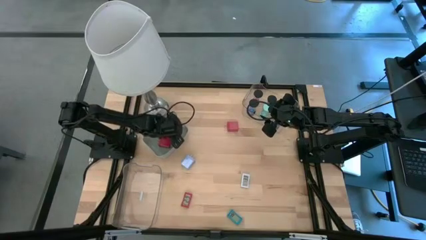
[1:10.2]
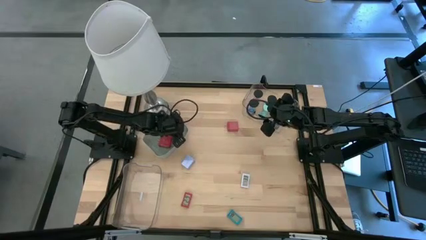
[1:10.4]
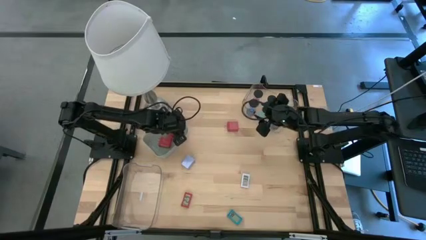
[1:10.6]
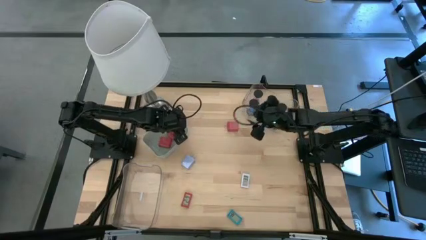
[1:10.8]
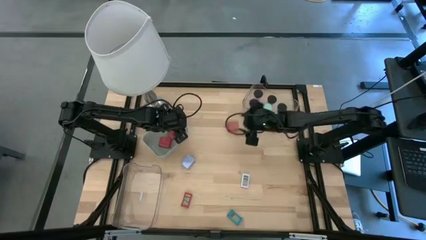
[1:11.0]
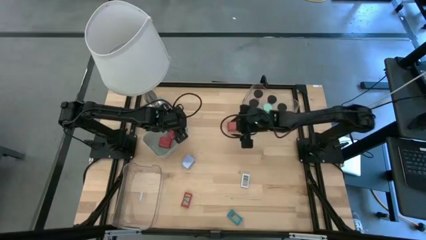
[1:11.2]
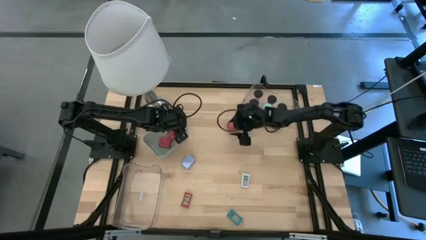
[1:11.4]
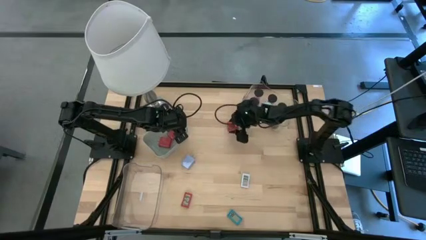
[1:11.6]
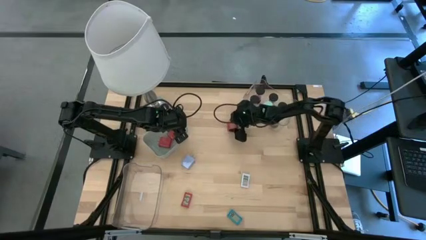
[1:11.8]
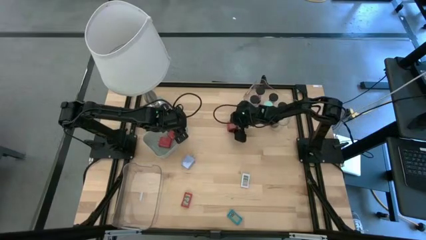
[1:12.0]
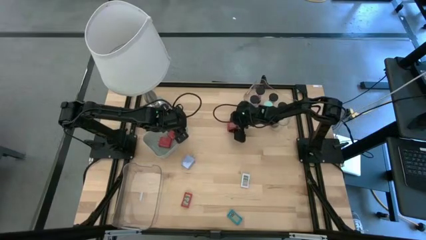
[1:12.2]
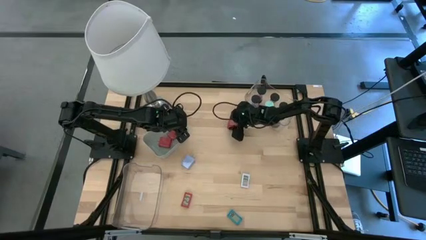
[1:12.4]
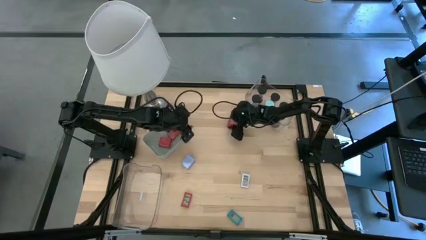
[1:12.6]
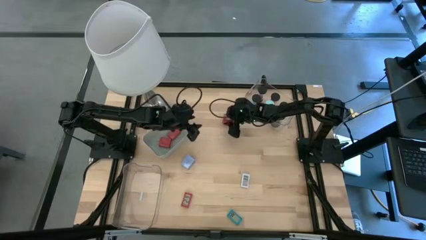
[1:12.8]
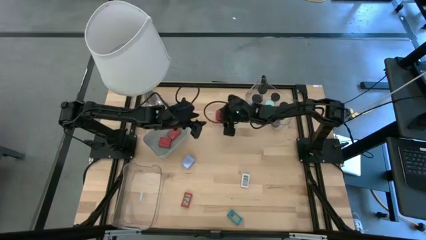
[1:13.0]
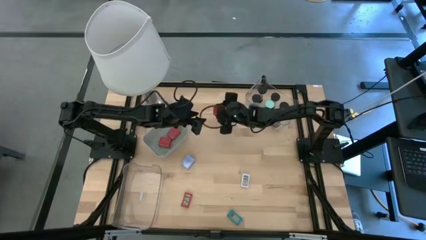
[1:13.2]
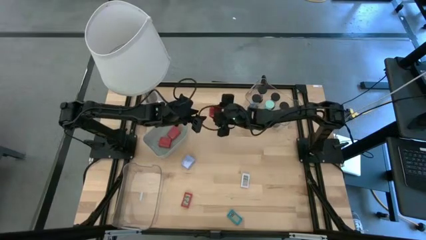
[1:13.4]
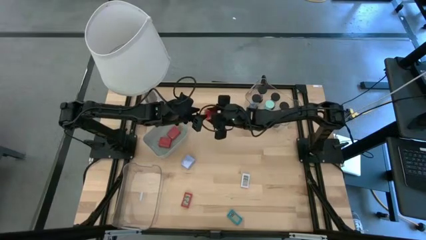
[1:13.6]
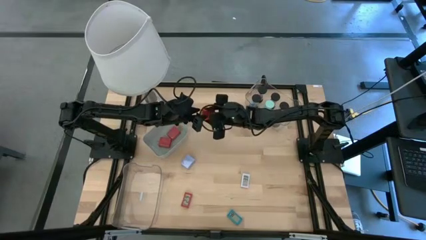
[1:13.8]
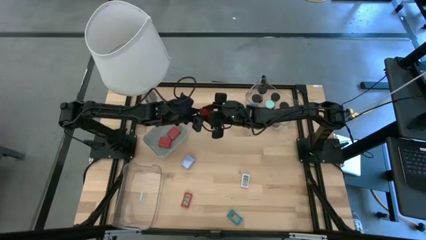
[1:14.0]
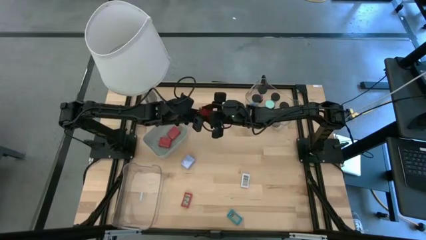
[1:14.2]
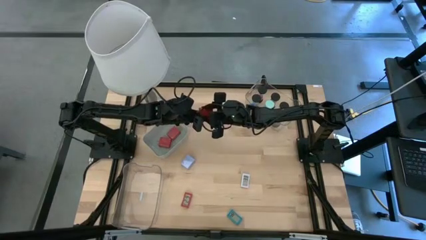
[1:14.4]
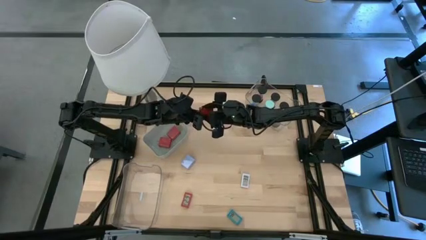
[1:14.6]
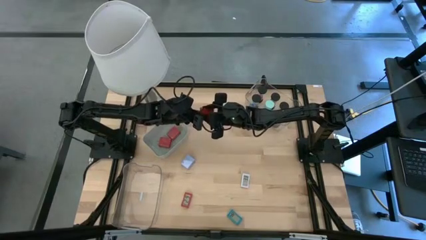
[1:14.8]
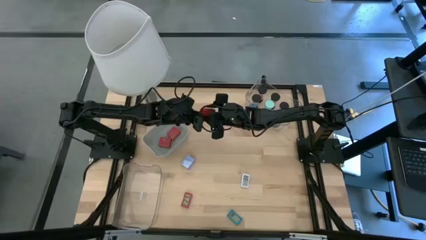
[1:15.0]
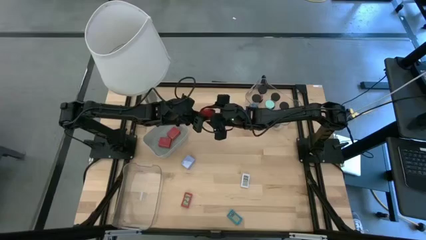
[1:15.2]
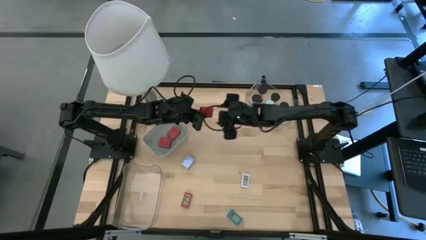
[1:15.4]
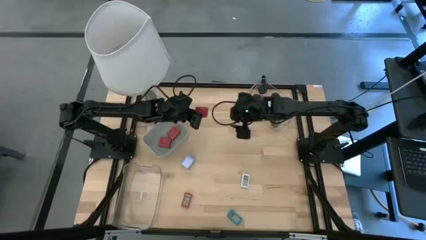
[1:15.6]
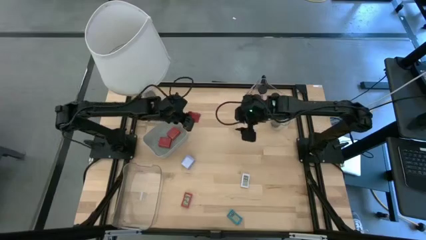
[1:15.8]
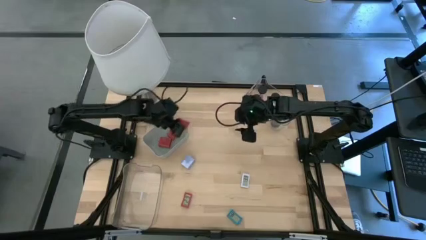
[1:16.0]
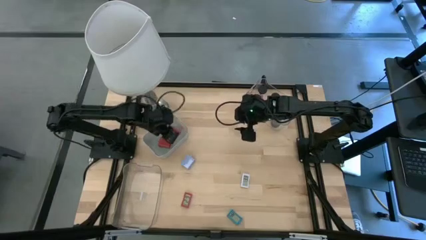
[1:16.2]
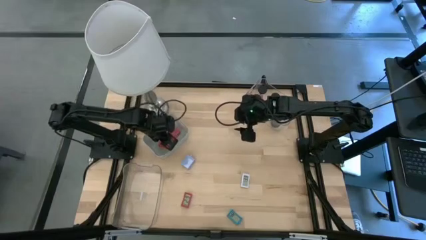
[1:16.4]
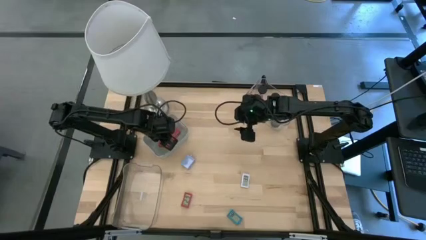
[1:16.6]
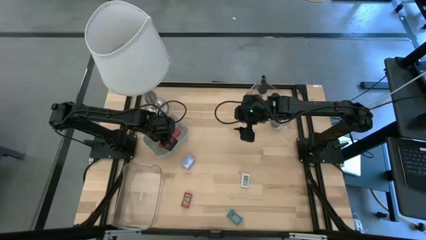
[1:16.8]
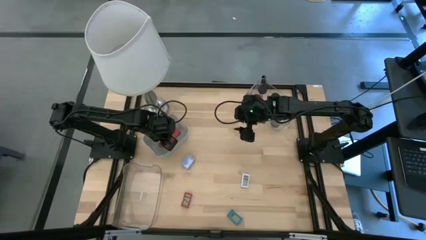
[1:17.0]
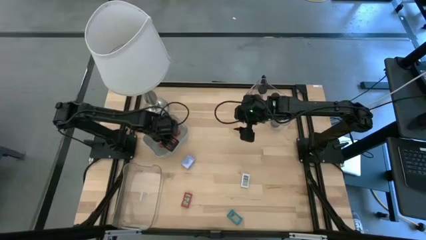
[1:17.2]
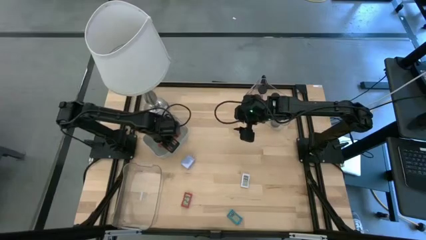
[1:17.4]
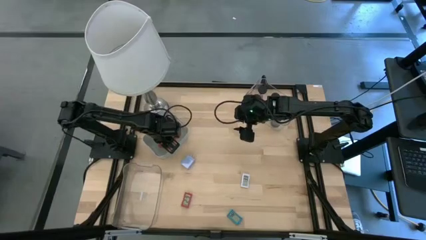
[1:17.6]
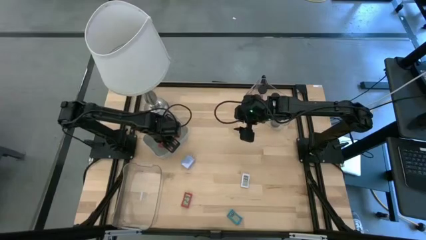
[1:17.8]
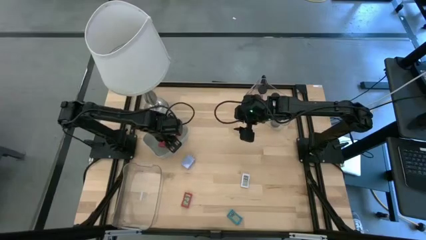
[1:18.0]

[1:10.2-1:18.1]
Task: Pick & Place Office items
Put the red charger adapter into the gray bin

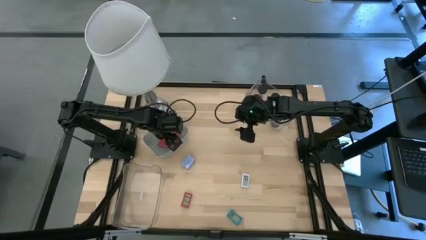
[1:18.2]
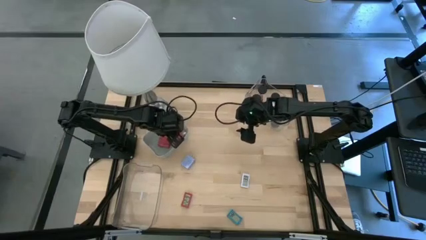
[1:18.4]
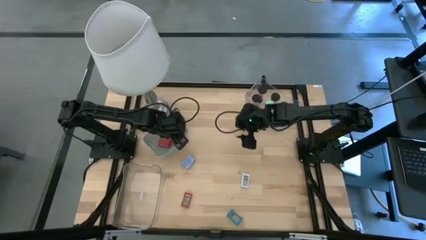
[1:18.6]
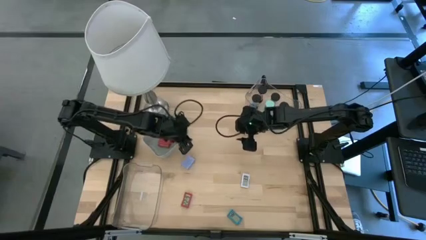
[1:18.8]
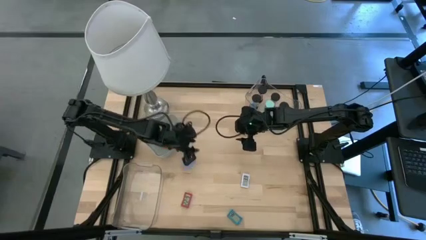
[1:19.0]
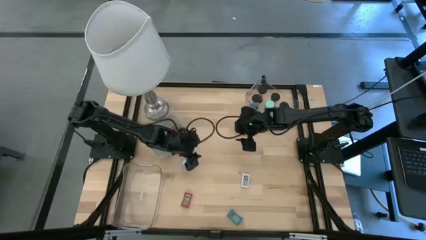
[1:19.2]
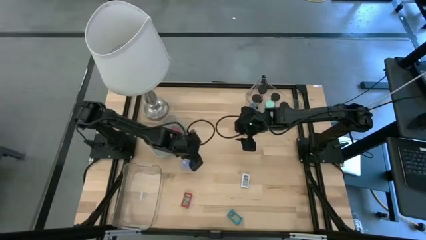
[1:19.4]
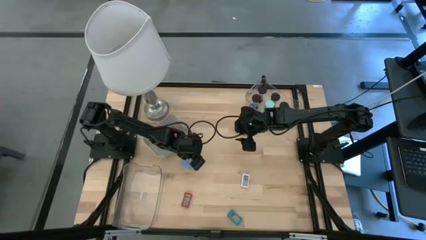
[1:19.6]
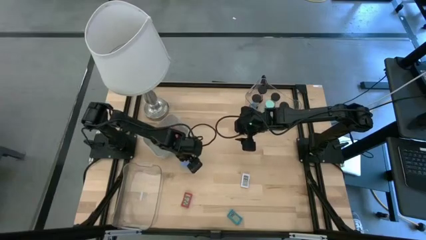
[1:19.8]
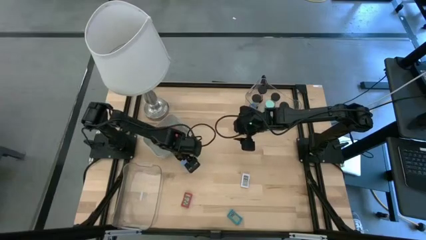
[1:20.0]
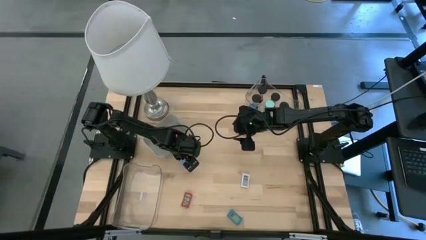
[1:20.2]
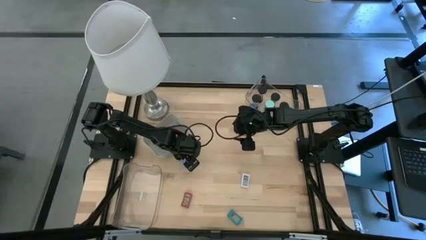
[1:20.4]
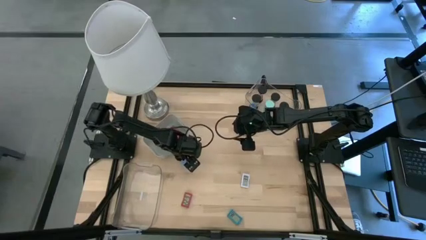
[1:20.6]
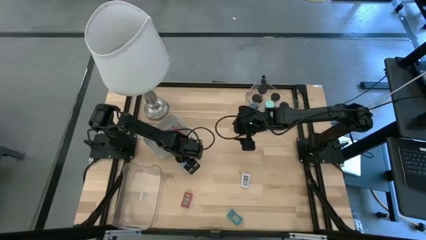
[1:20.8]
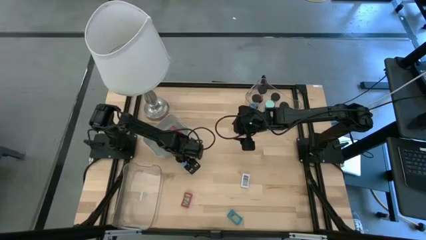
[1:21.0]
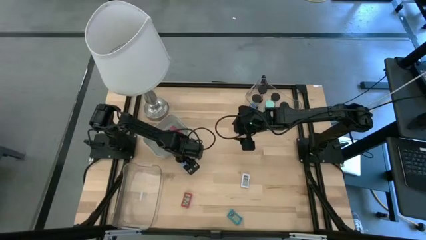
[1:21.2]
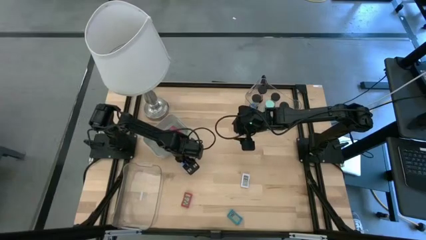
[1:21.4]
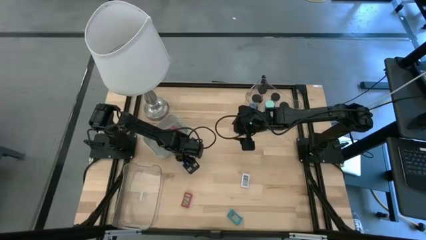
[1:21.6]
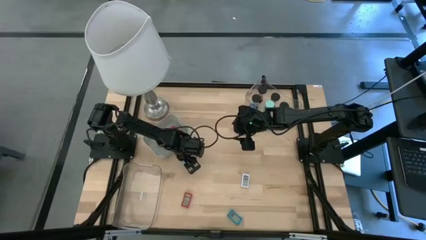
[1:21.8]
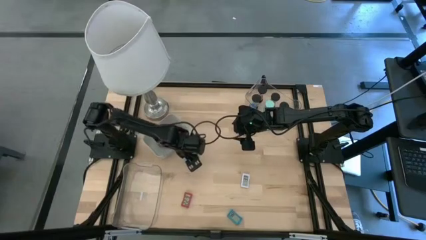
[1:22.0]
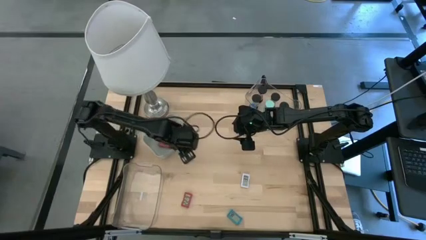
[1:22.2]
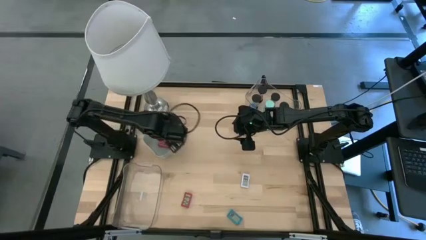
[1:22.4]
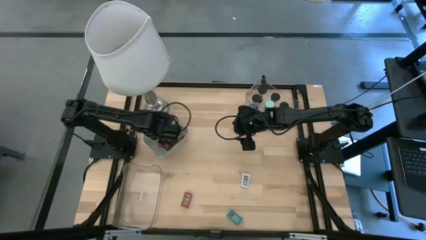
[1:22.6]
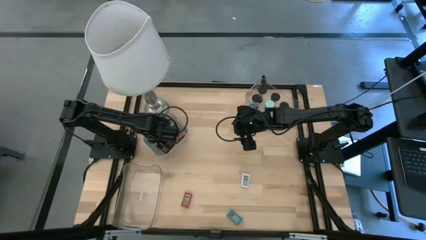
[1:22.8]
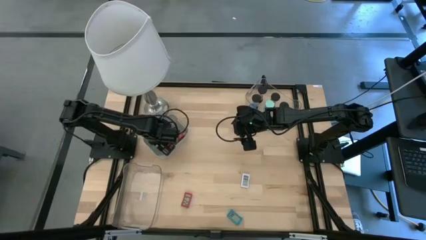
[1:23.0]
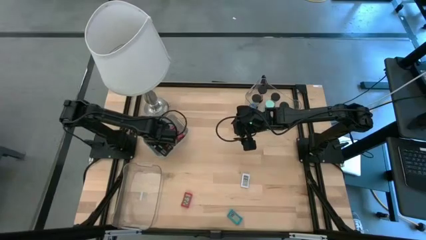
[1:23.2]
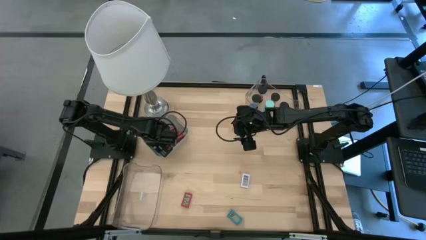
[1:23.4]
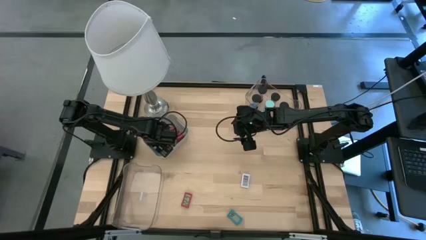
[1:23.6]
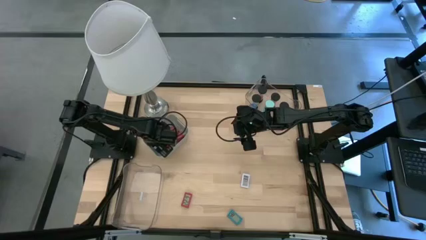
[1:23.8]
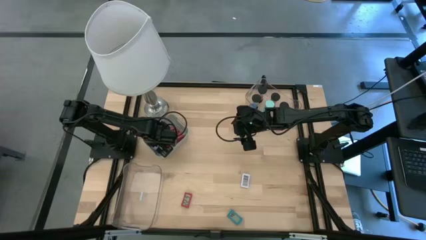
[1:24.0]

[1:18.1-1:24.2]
Put the light blue charger adapter into the gray bin

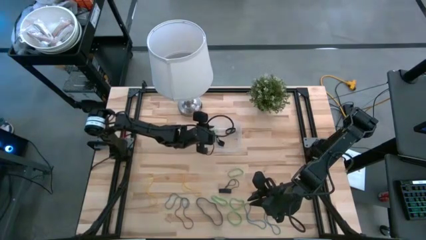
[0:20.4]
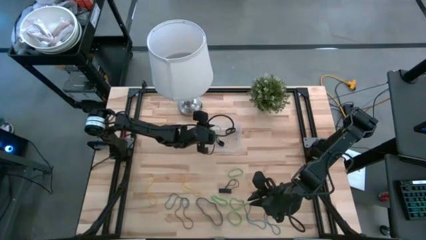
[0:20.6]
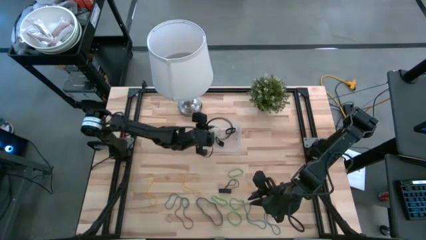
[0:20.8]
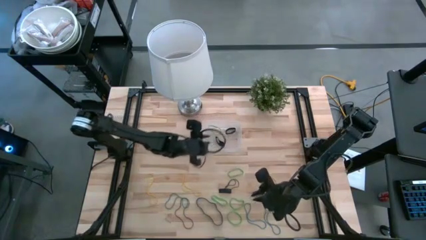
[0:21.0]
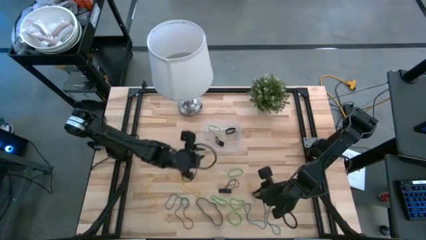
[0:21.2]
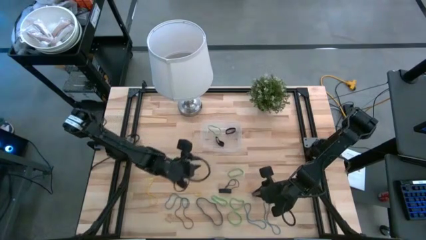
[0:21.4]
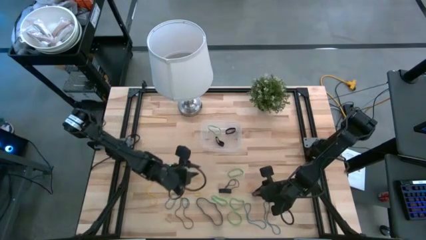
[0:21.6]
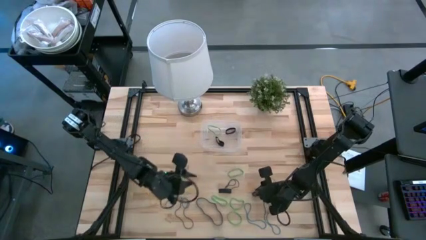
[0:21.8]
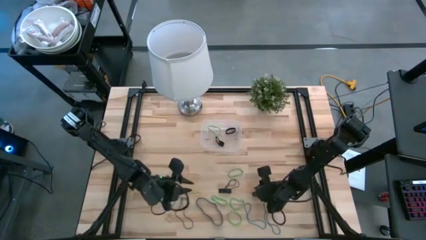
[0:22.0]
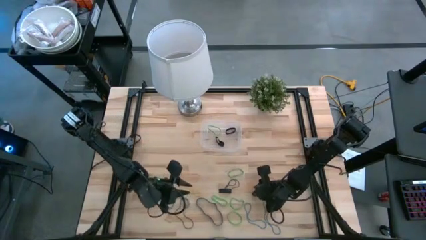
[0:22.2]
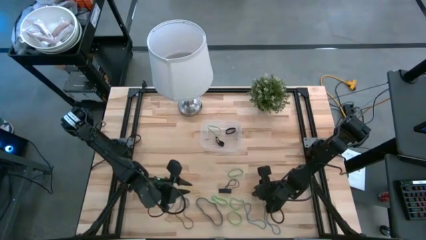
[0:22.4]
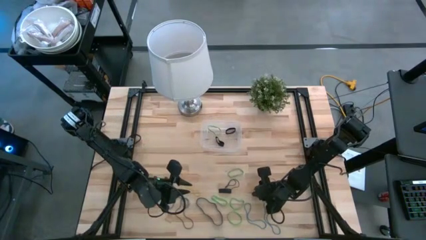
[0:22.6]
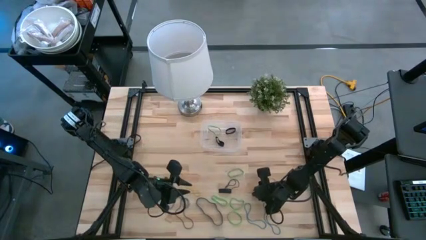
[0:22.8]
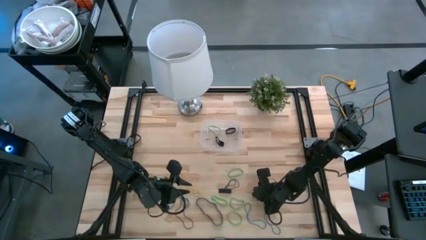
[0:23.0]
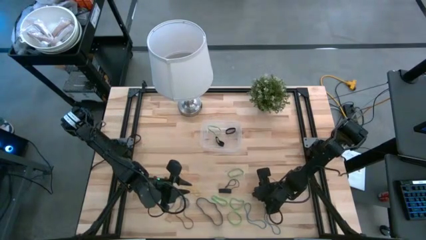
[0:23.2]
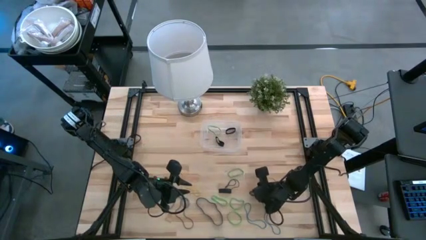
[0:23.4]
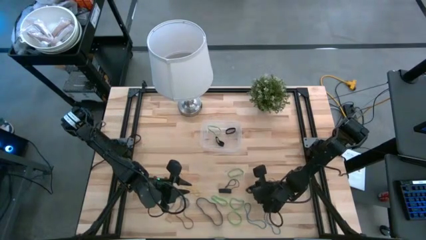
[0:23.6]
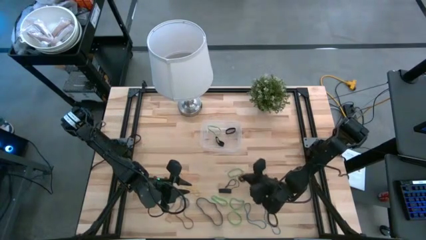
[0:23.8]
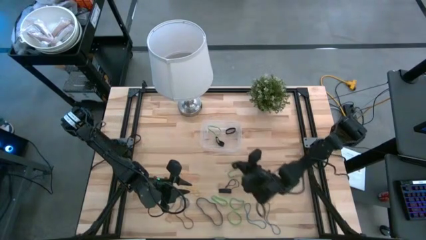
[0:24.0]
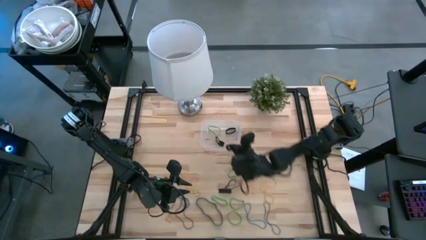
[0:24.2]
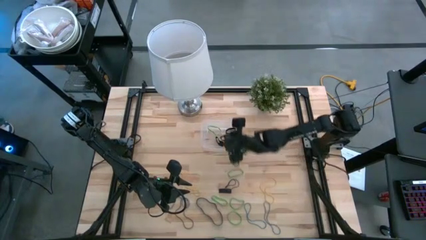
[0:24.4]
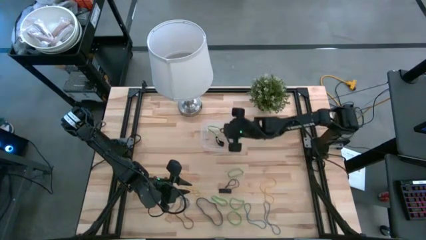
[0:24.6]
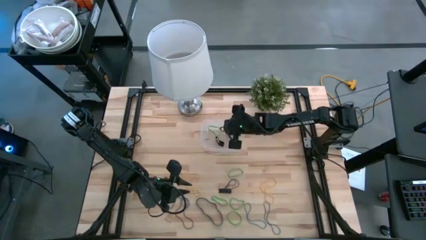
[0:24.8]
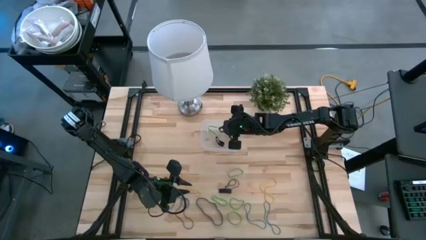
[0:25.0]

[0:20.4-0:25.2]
Task: Pick and place rubber bands into bin
Put the black rubber band into the transparent bin
